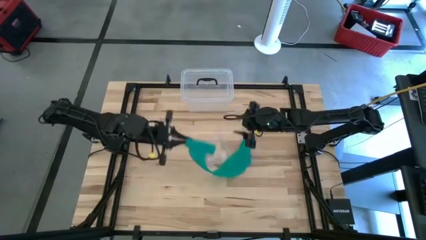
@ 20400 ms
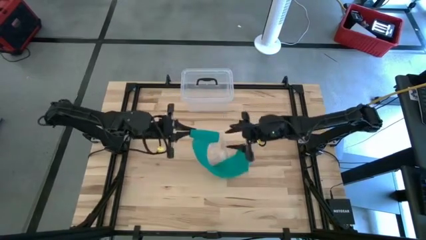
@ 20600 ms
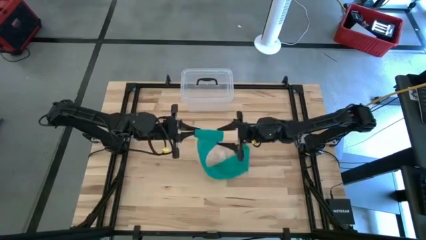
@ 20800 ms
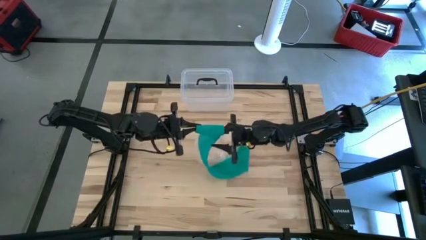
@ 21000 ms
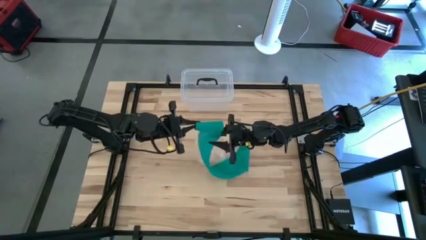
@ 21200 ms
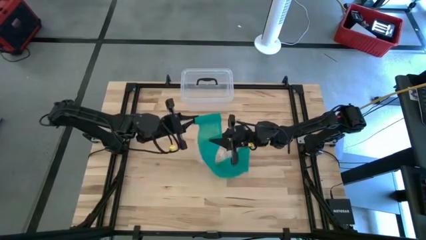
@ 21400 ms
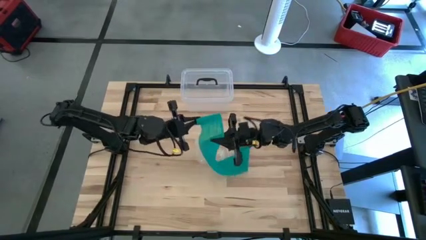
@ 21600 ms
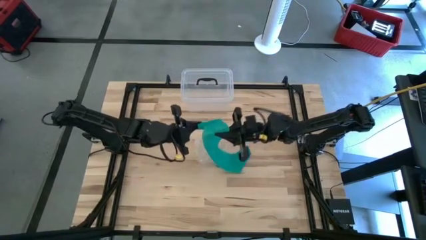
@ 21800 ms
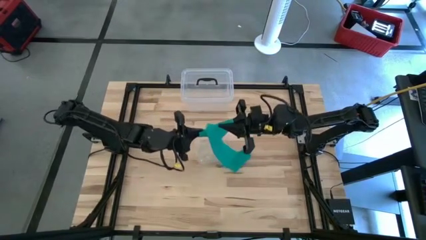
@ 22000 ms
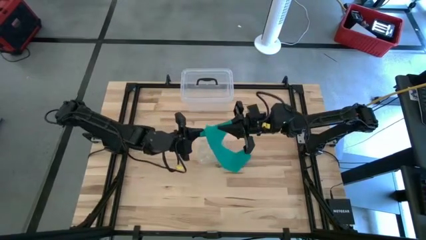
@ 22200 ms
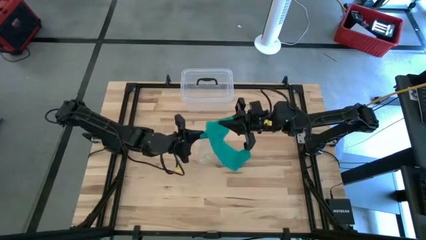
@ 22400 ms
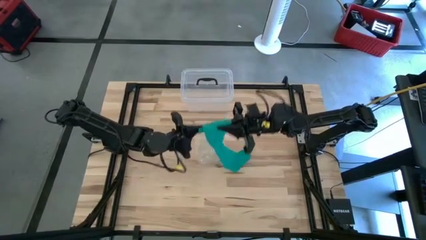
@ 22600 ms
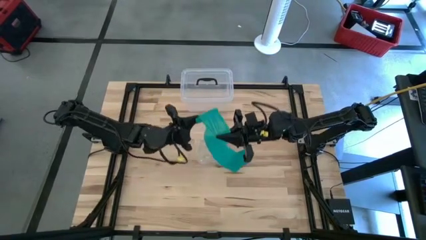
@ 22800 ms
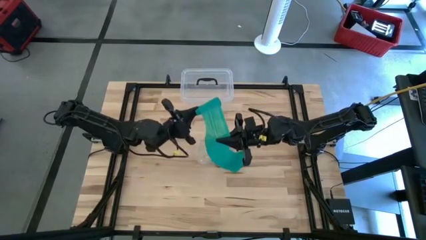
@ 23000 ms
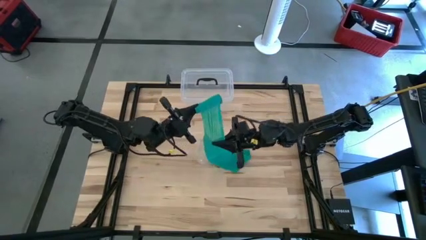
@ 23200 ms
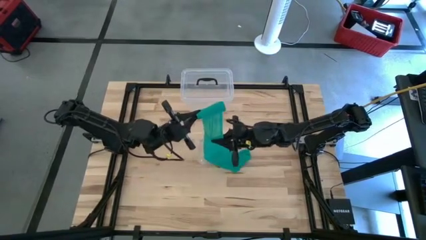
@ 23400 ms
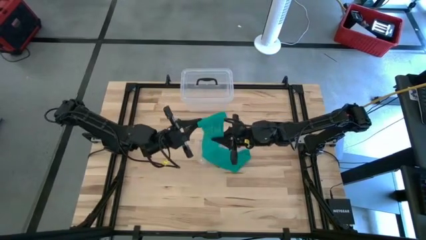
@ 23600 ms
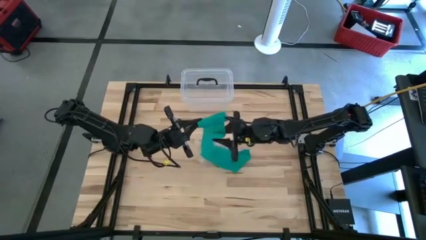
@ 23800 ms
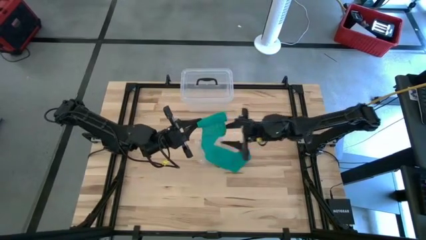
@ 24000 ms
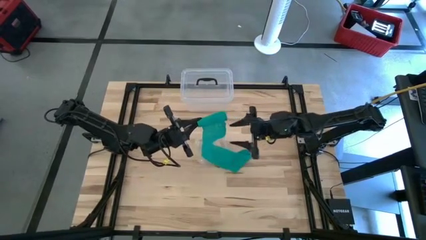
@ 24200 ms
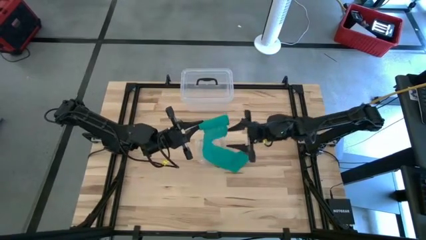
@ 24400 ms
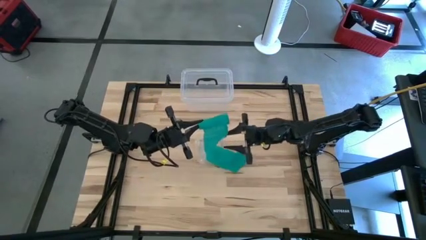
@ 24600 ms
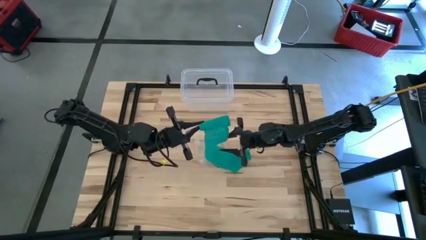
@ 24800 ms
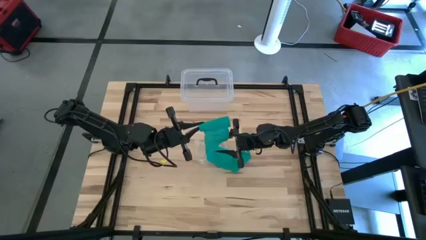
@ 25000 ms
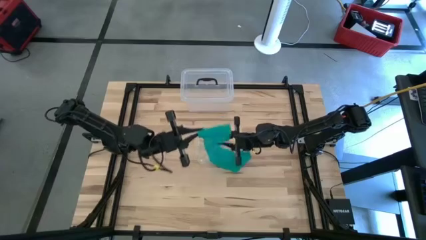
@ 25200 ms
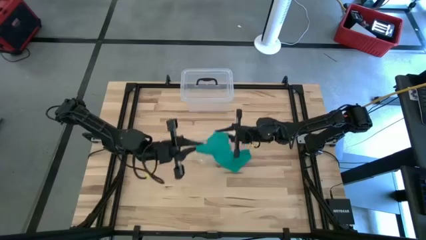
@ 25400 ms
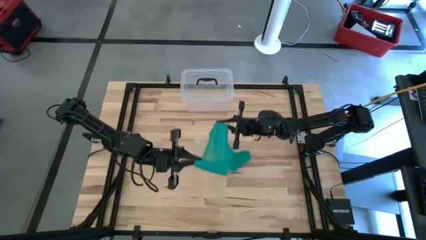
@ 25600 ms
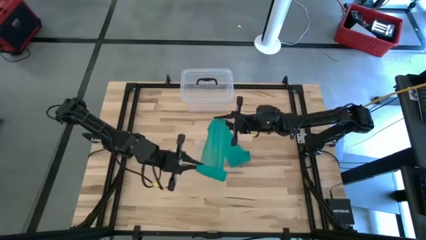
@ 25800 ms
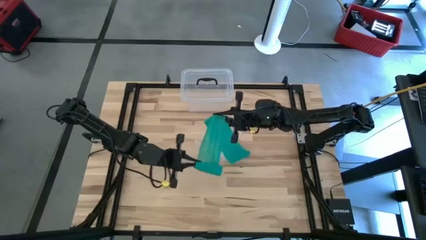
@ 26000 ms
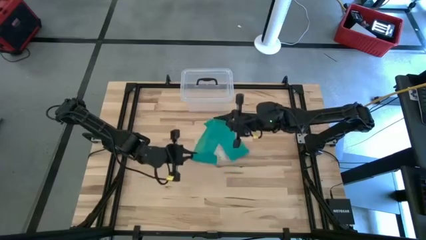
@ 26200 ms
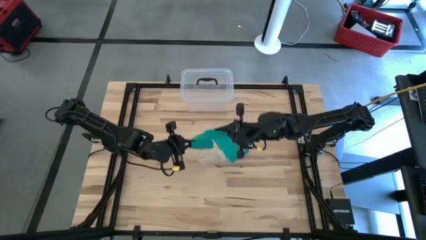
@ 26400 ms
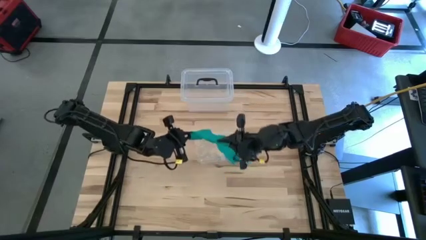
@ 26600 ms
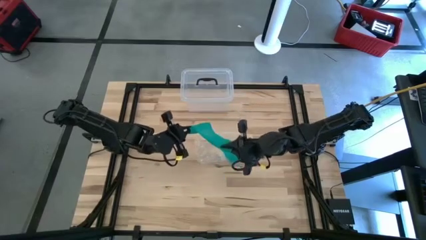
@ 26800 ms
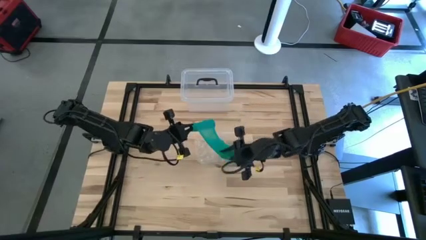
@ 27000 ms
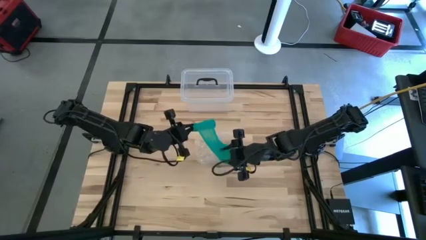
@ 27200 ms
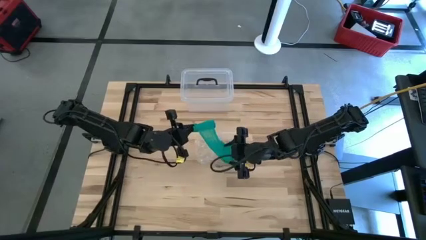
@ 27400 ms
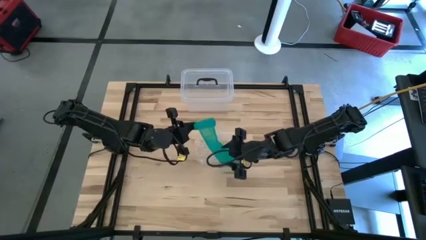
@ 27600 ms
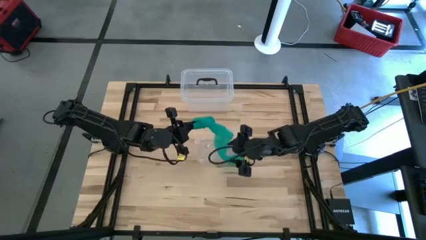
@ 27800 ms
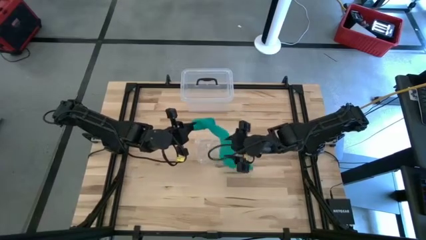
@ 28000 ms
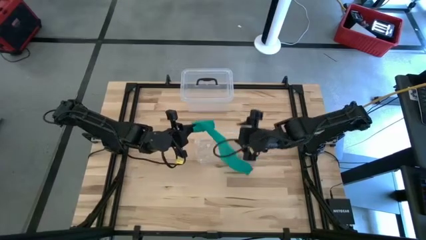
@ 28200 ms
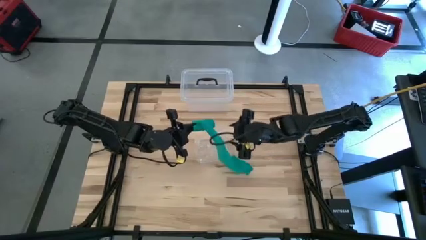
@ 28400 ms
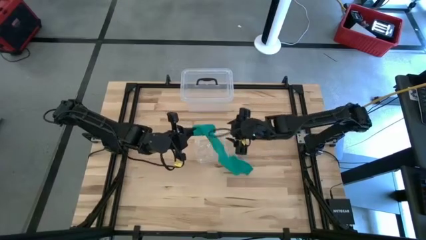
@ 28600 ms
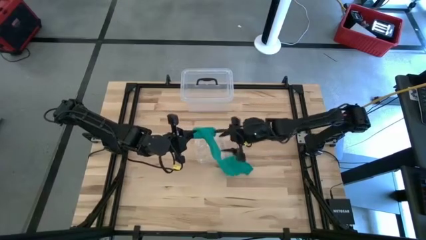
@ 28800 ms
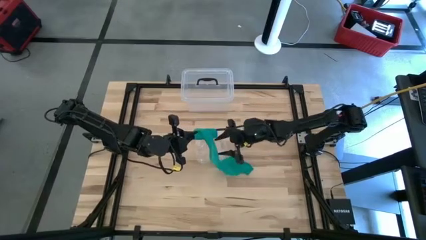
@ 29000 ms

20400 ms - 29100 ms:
Task: Roll bandage
Roll the green bandage

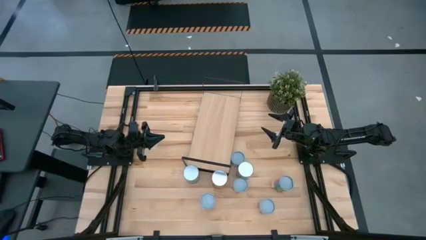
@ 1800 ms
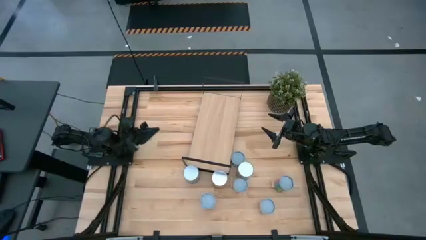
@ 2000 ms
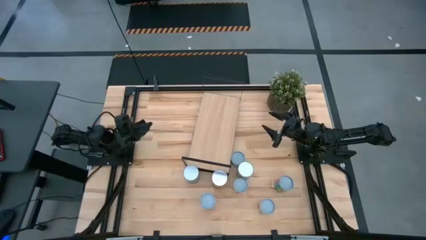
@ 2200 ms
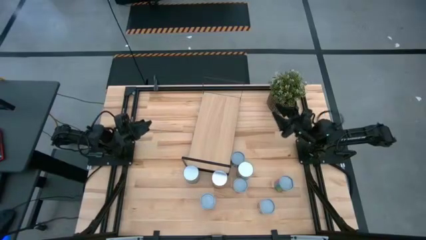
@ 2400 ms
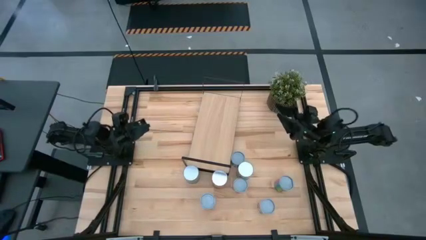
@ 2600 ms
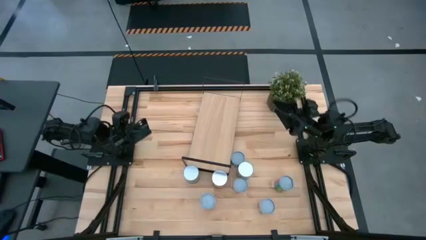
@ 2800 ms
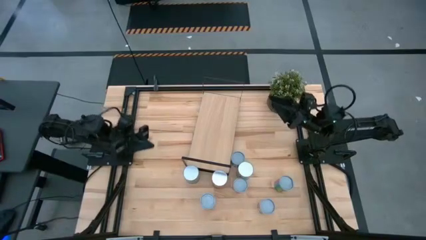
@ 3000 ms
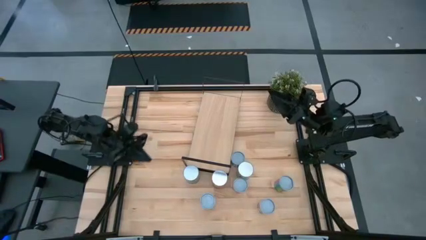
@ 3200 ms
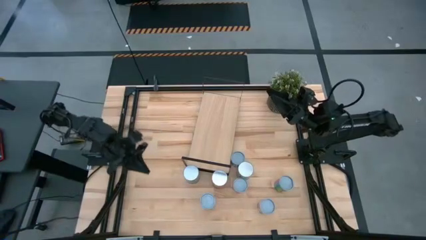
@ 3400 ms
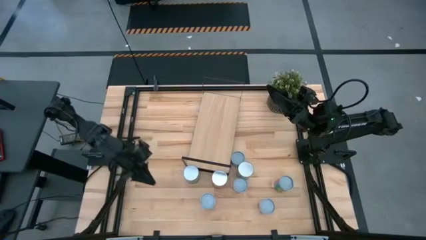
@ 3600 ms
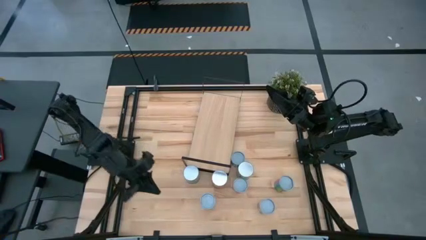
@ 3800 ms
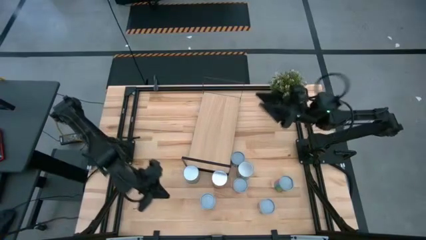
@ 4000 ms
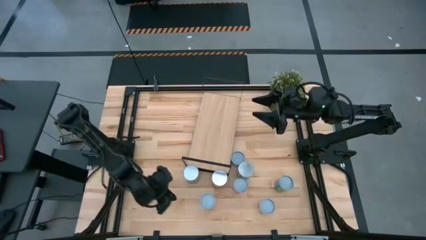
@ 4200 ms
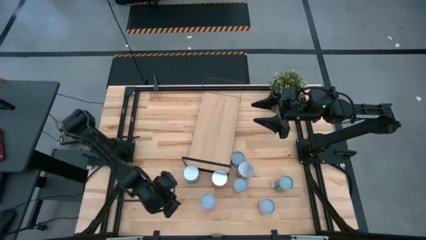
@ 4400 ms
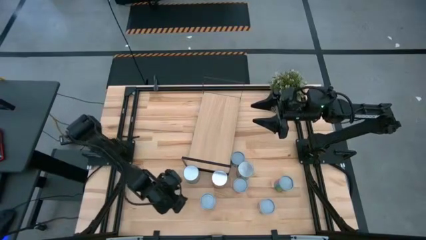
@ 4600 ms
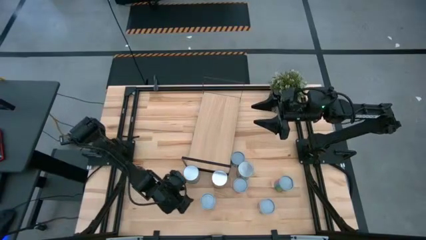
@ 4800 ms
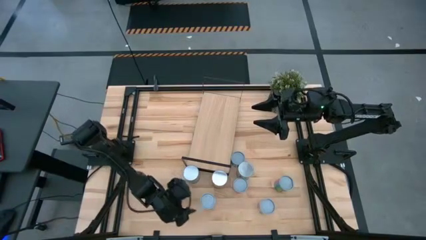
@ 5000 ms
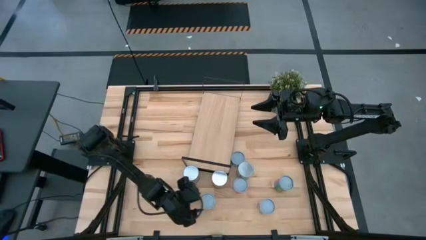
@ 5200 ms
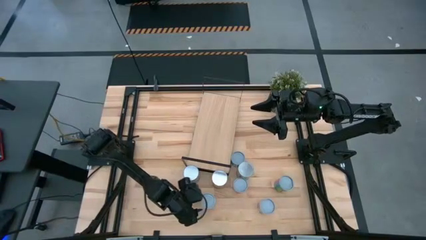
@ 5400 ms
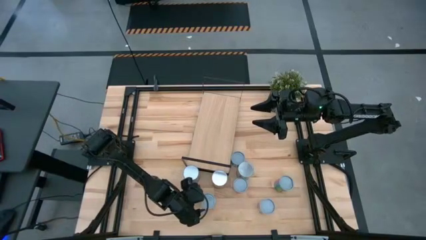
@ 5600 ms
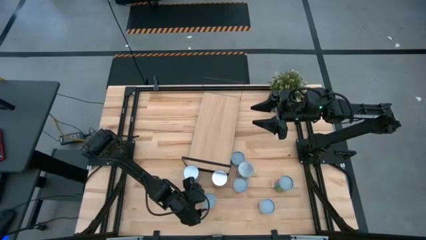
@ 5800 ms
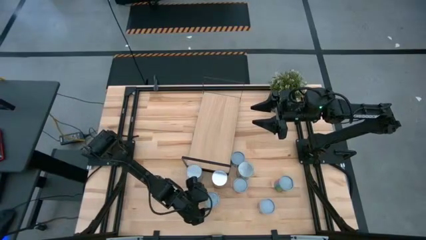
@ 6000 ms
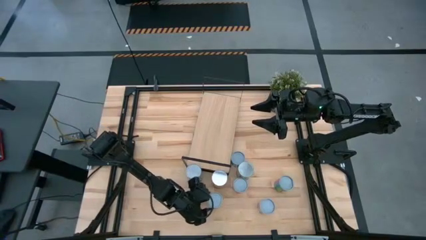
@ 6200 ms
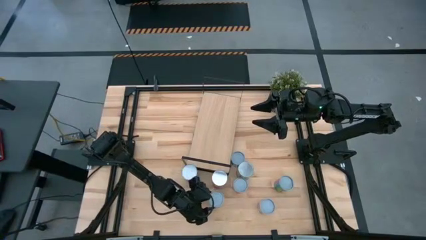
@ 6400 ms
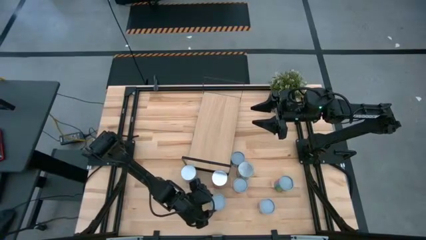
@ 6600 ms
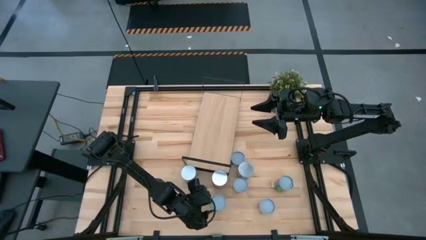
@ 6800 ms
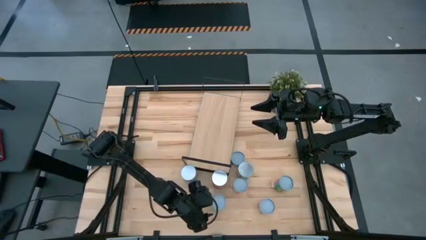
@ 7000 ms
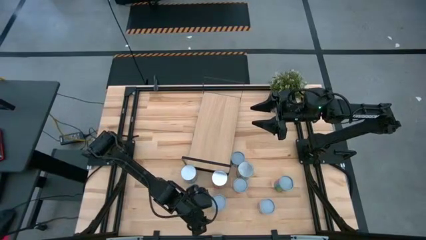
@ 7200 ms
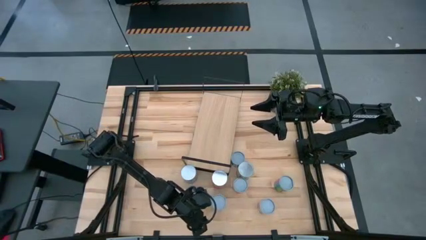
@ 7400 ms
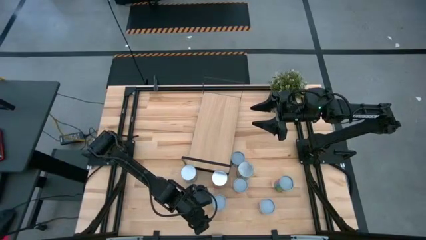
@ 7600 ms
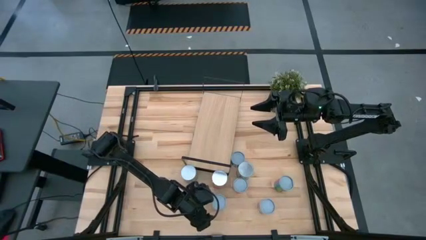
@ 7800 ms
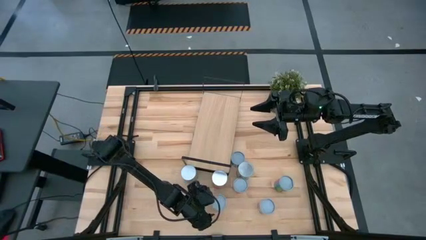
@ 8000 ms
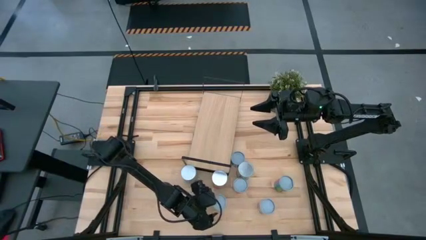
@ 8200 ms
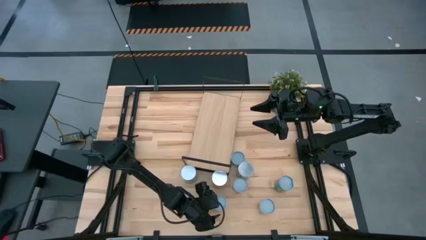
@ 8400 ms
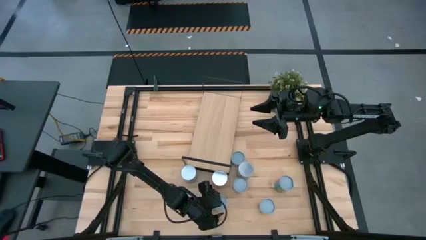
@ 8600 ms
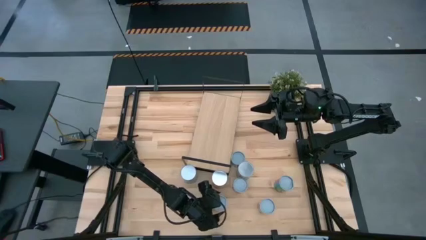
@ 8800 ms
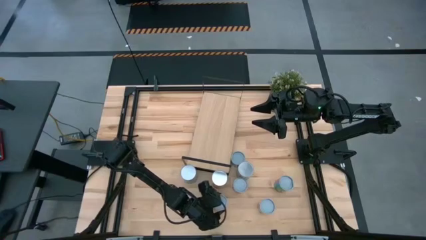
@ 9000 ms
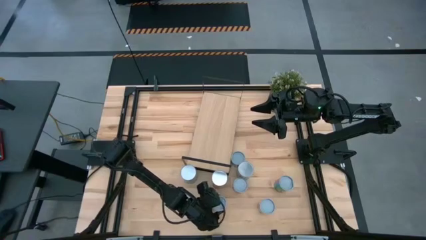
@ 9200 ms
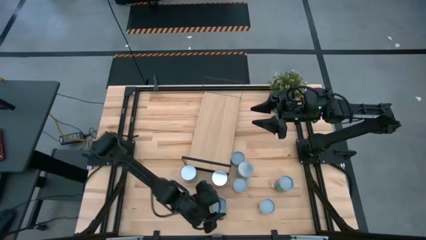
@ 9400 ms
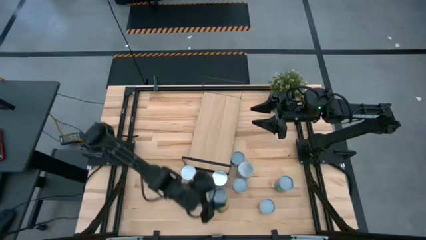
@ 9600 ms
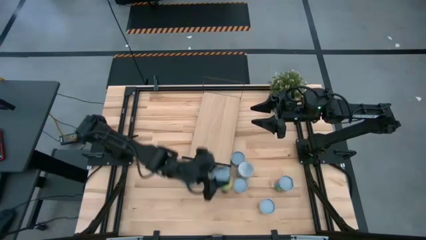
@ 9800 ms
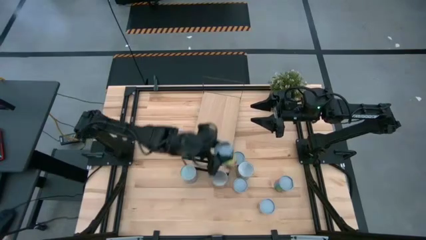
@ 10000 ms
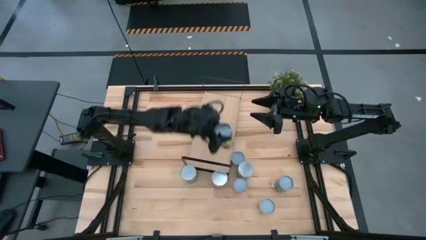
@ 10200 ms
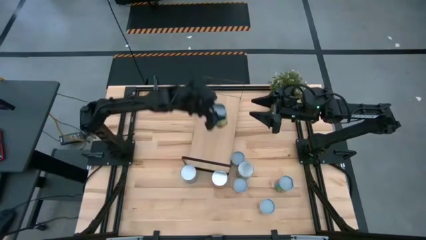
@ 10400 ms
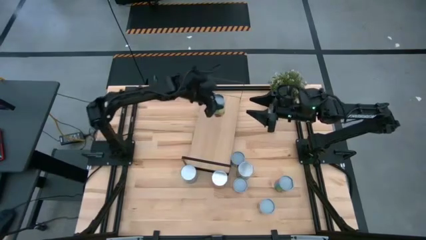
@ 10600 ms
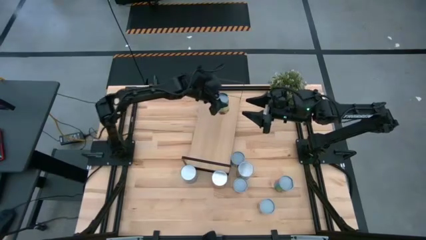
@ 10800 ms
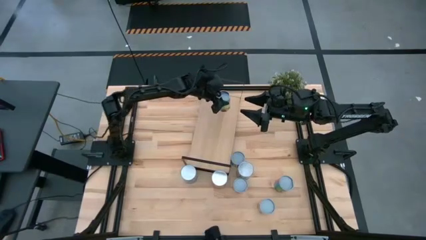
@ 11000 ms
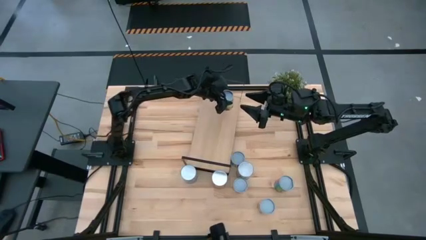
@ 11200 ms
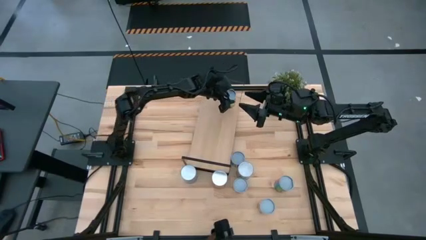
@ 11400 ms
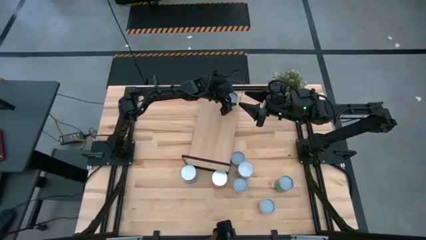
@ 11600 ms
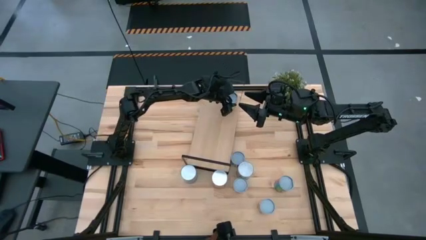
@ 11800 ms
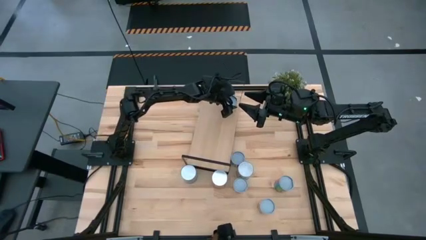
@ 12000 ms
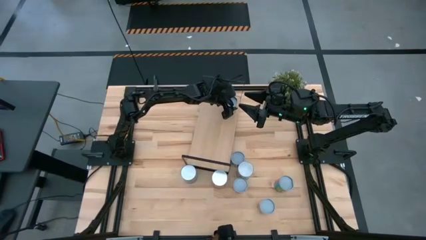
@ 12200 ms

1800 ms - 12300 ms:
Task: Pick and place cans onto a shelf
Put the left green can on the shelf
